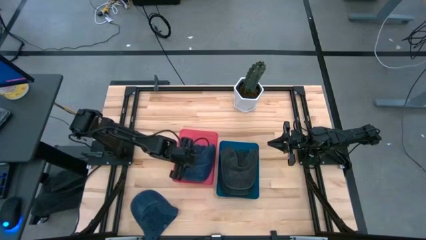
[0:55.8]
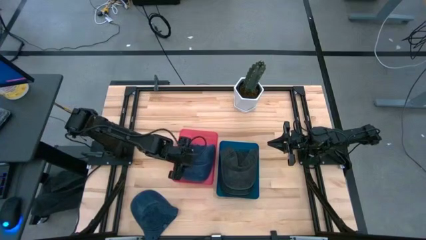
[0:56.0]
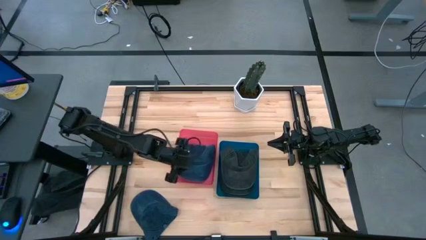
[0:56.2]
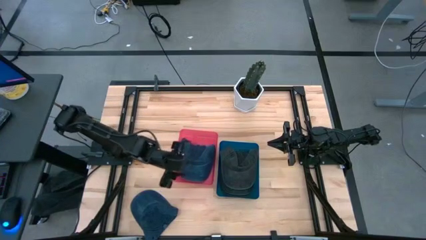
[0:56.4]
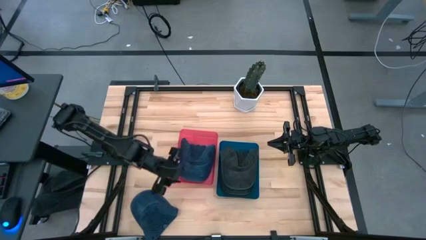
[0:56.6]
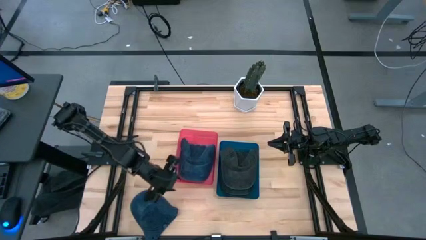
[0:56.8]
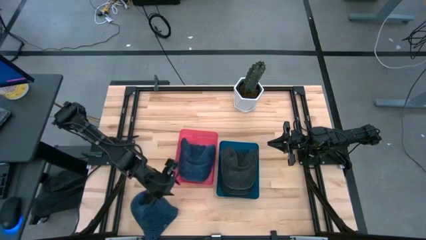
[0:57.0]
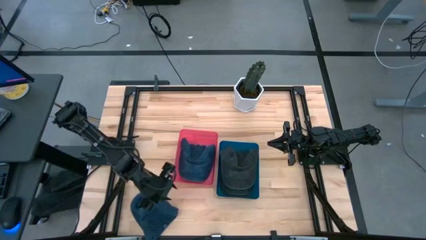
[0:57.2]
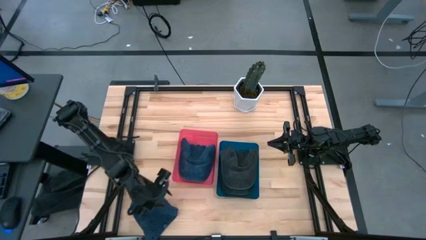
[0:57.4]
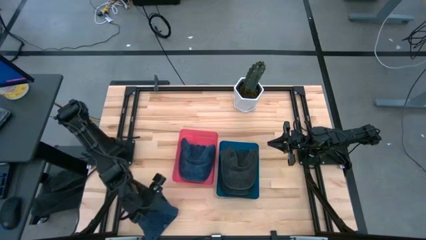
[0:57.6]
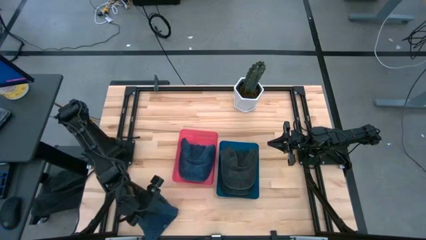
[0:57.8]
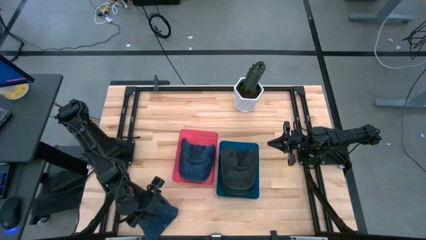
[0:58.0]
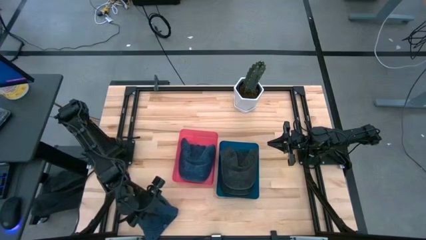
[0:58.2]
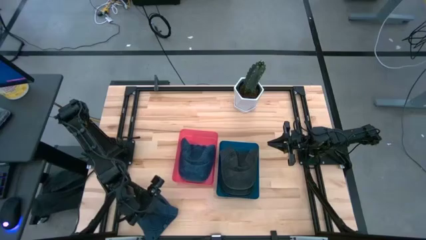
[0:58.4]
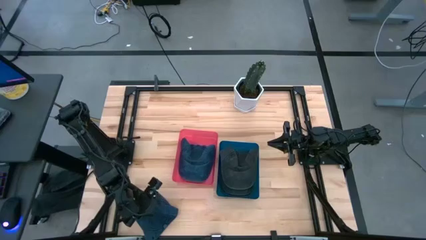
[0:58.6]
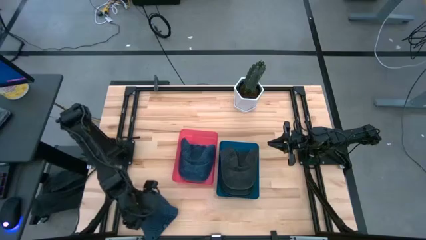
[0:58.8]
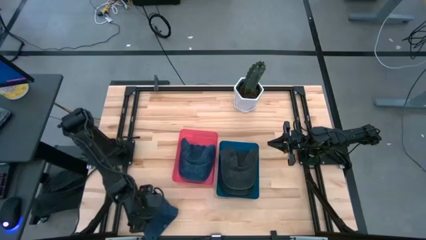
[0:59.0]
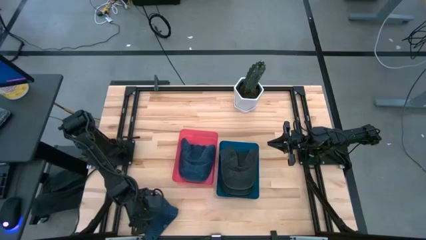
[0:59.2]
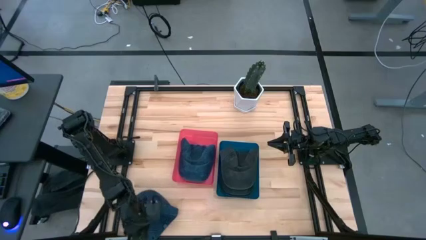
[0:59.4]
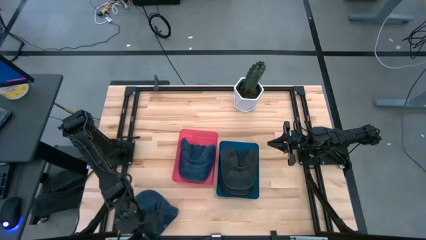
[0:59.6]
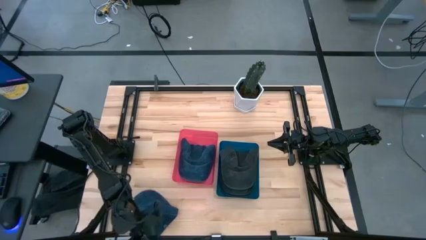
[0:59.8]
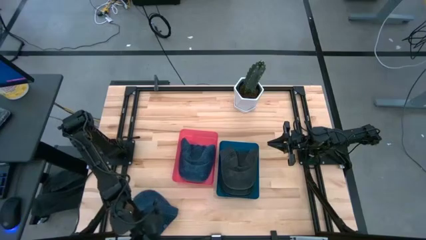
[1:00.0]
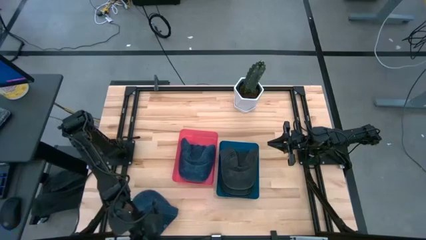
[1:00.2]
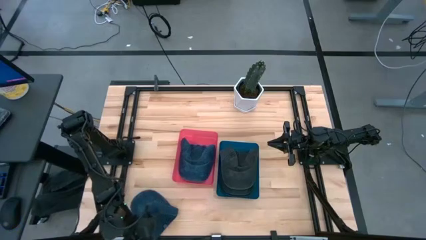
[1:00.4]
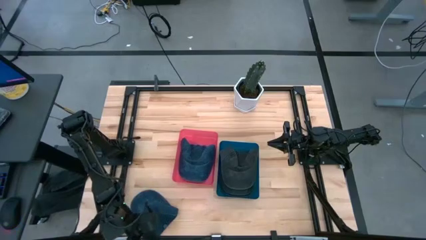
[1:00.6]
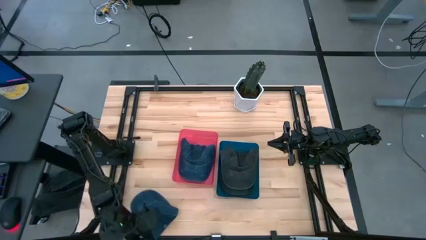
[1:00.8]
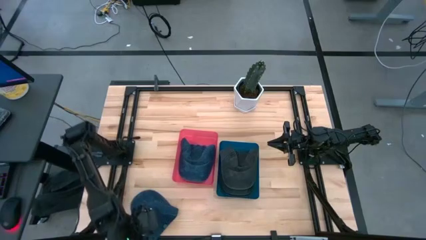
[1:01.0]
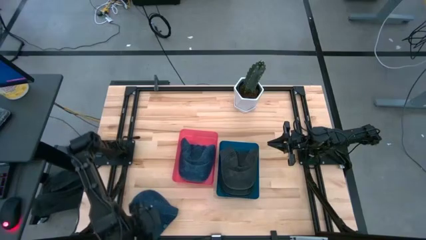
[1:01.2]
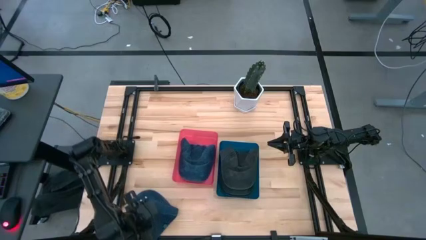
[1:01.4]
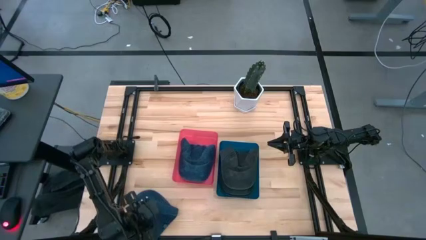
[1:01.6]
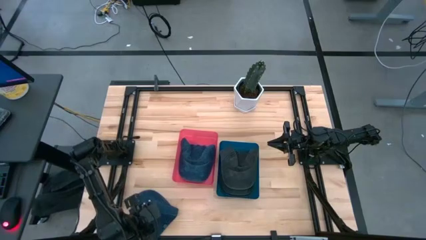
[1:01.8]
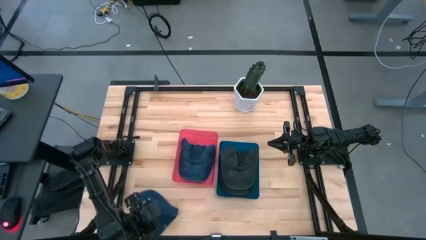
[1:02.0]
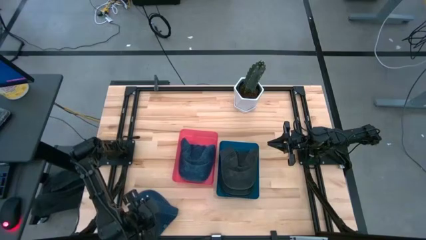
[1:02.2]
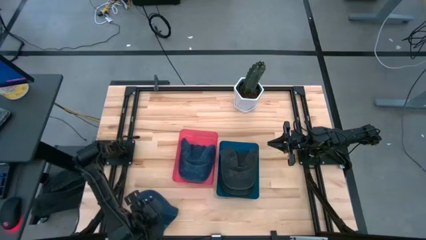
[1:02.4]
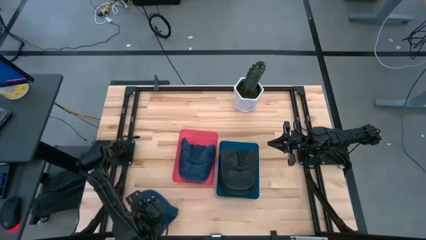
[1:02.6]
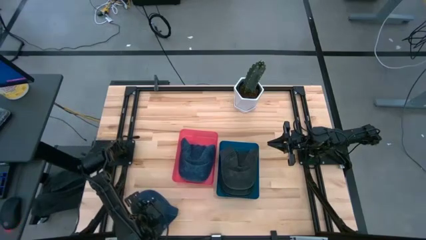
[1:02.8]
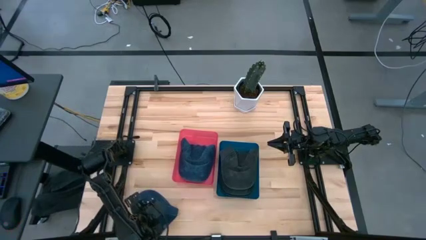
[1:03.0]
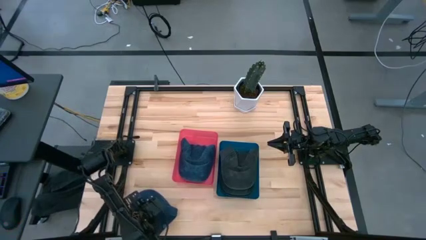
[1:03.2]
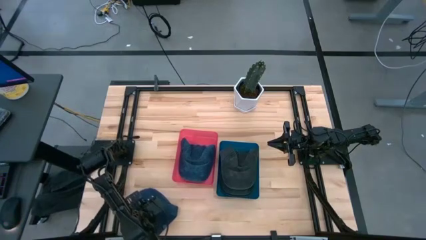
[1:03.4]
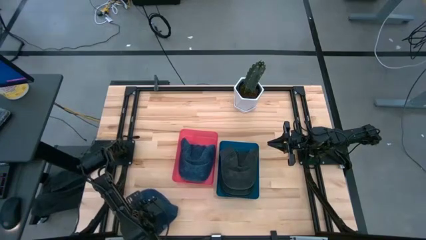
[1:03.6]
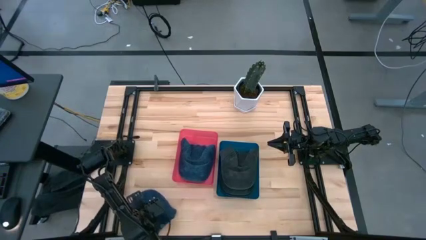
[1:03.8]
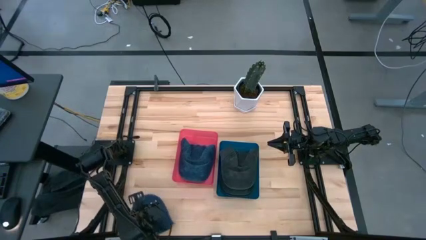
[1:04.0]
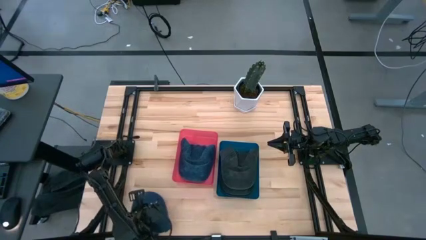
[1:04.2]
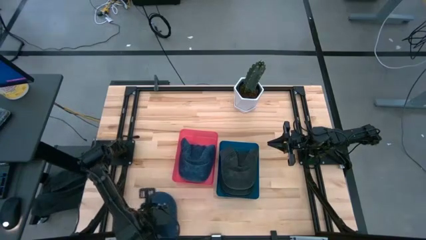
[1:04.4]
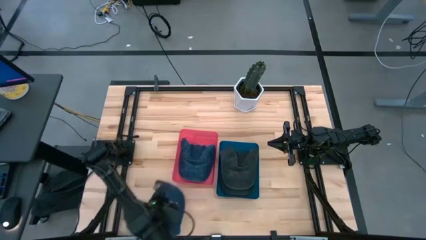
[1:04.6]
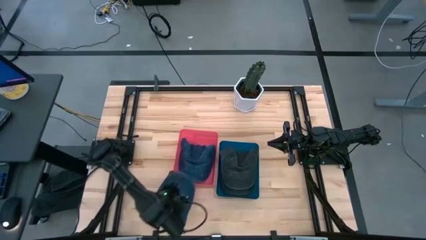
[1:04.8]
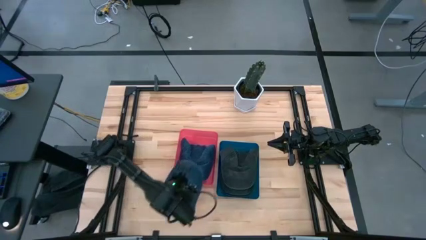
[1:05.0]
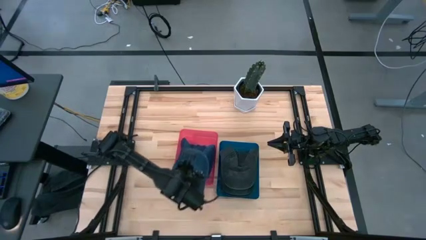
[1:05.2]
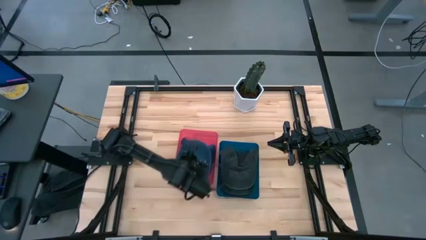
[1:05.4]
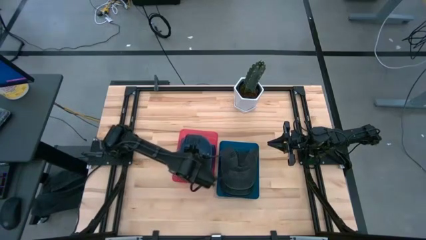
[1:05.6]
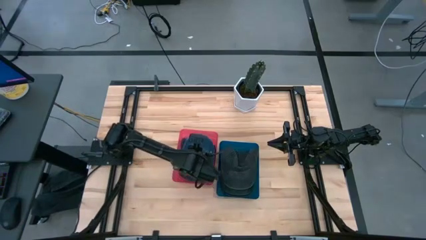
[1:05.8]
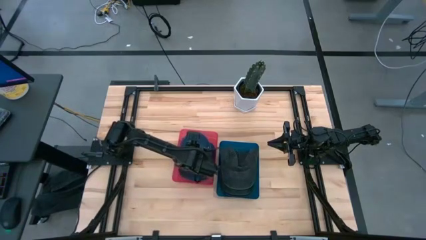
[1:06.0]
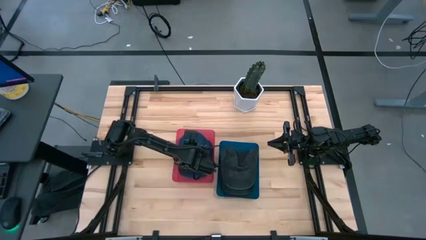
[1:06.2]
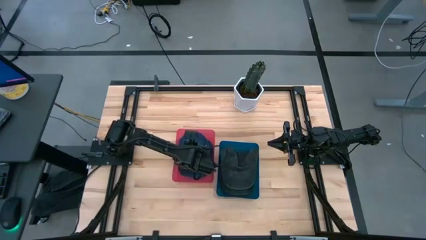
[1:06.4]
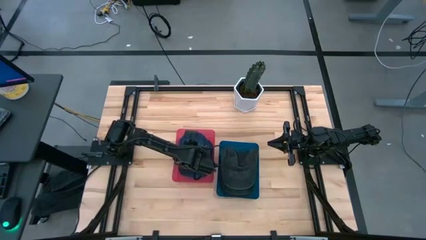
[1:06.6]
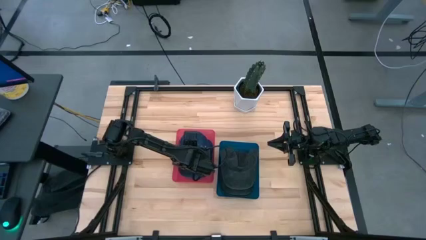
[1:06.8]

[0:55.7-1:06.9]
Task: Pick & Place hat
Put the blue cap into the red bin

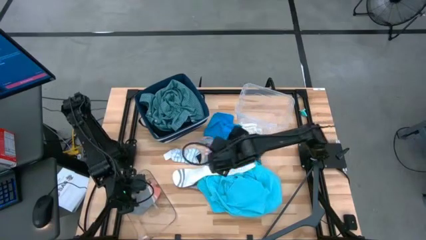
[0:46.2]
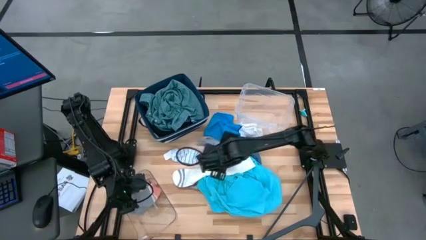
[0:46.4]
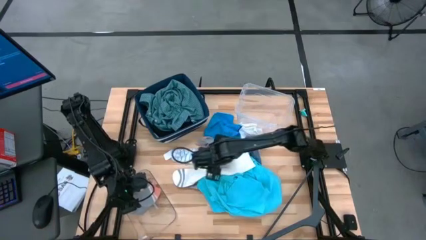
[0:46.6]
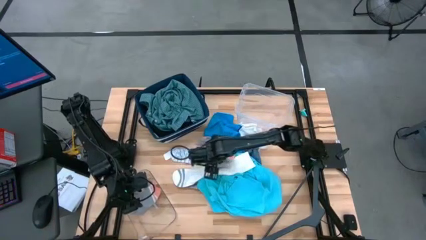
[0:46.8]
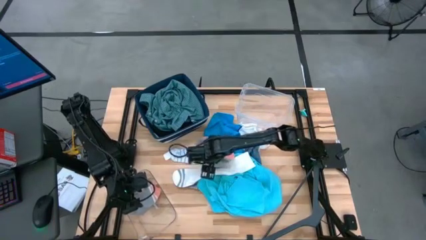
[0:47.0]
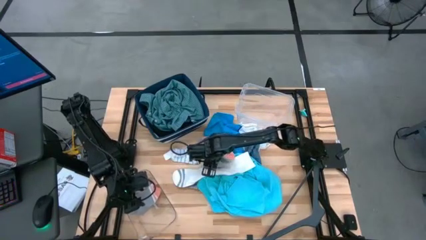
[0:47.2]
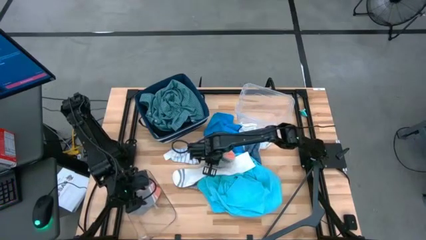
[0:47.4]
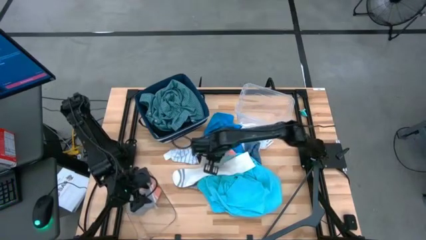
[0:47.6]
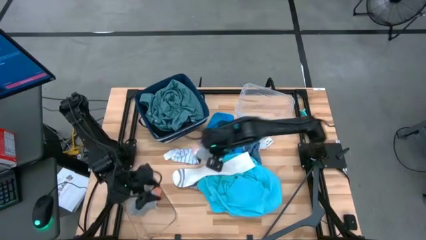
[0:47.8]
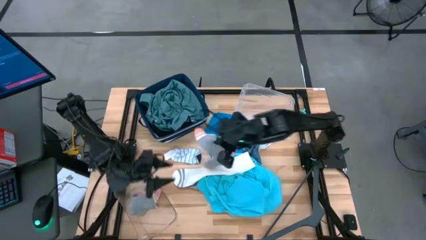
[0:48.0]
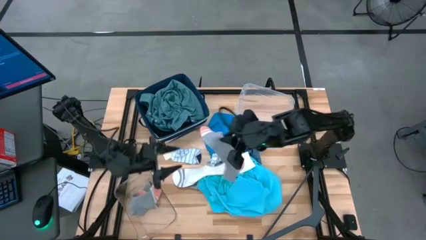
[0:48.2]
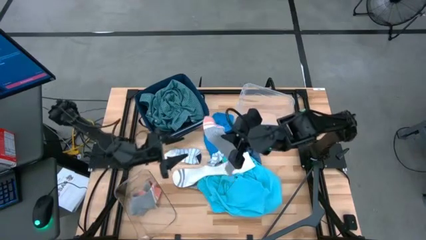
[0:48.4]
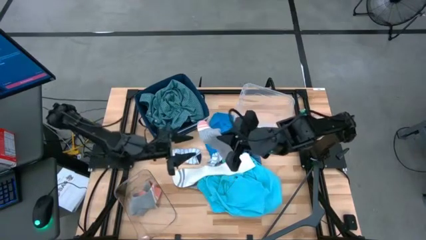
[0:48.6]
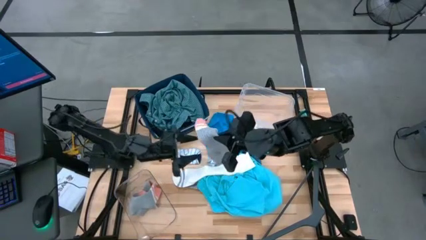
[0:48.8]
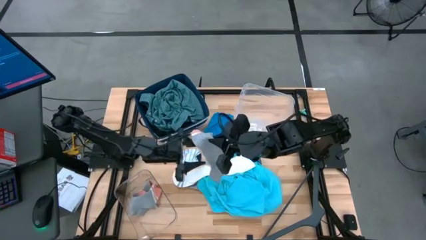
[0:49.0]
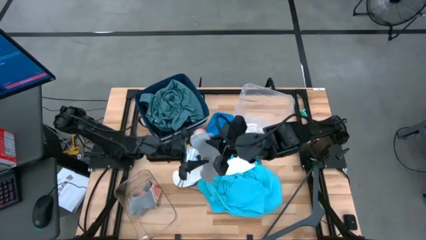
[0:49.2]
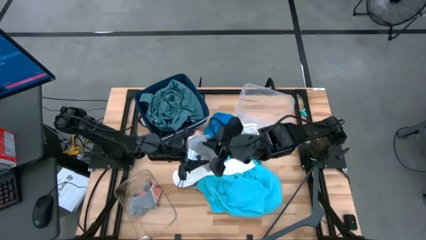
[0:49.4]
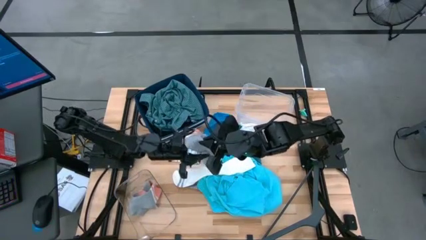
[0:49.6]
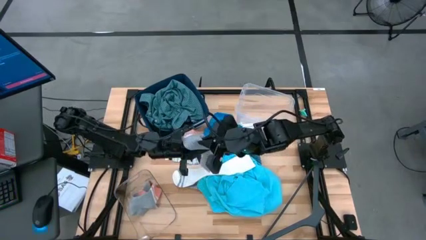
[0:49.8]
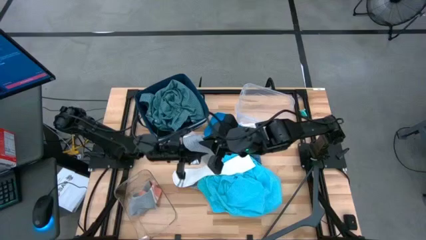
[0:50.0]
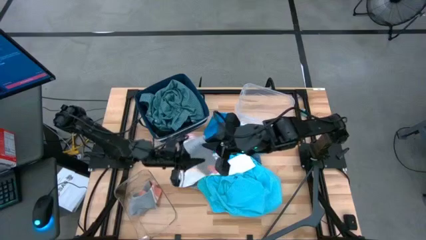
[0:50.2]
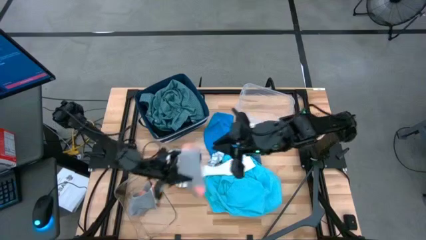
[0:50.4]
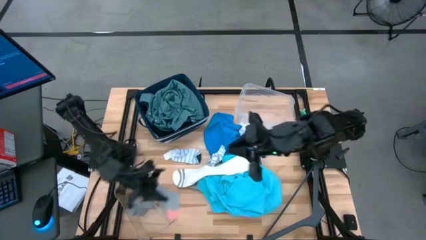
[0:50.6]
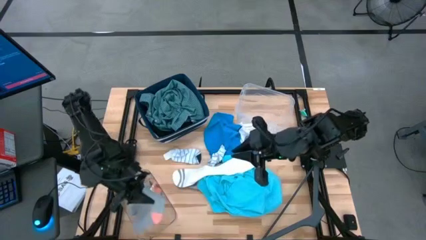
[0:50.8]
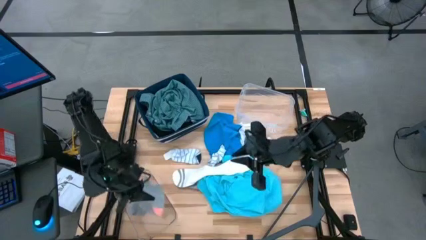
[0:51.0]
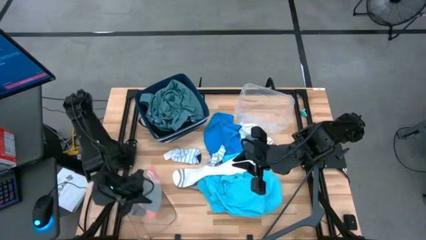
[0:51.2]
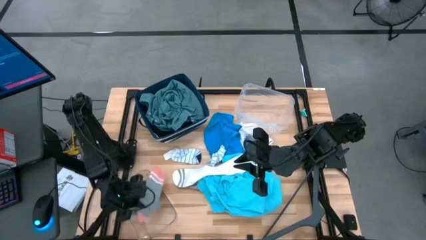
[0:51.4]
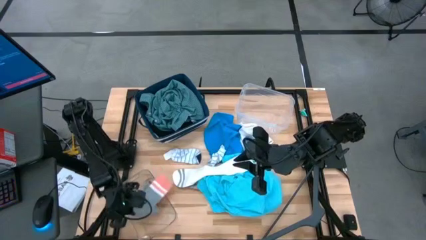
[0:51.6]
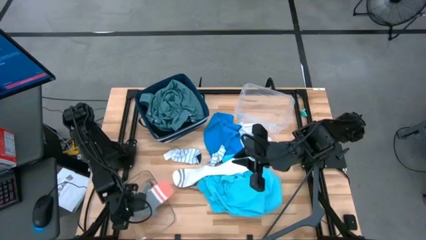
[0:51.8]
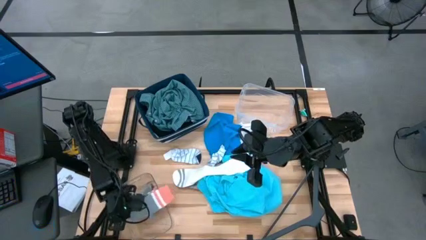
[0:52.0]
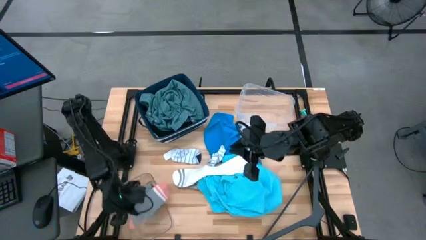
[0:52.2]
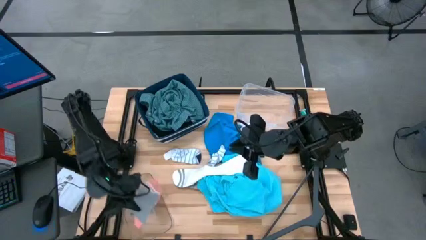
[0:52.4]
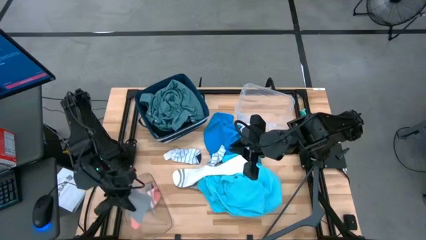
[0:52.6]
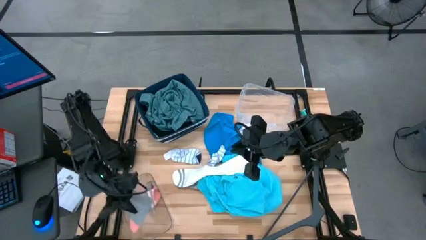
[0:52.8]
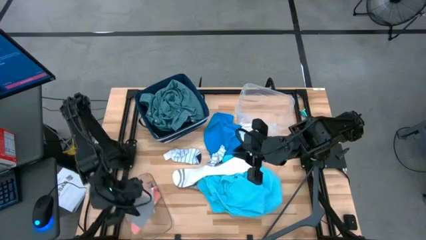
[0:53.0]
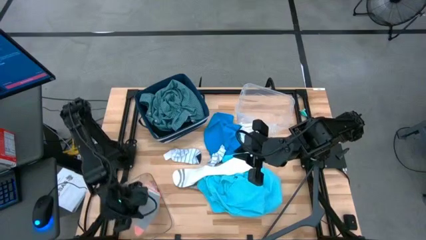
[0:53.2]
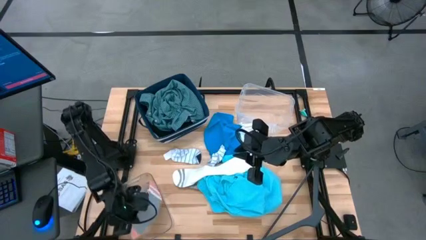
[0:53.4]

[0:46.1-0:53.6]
Task: Pick & Place Cloths
Put the gray sock into the transparent bin
